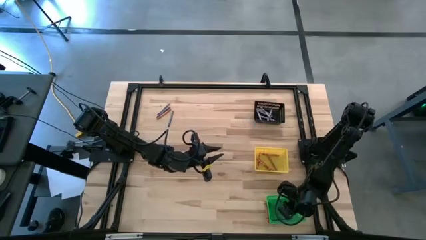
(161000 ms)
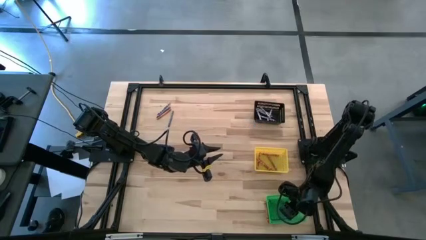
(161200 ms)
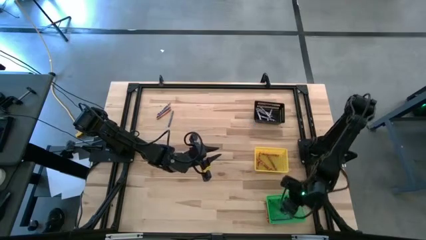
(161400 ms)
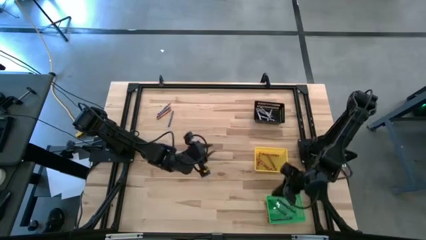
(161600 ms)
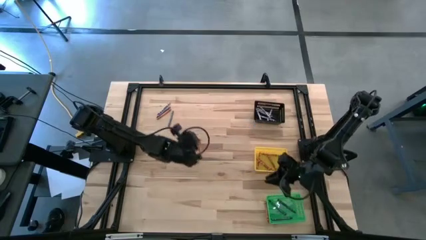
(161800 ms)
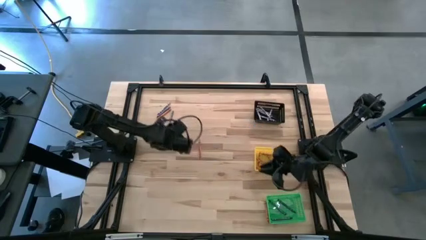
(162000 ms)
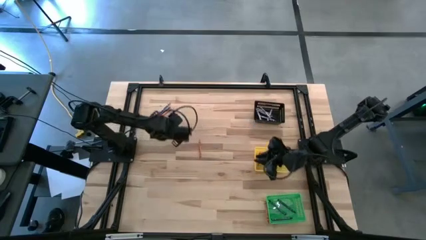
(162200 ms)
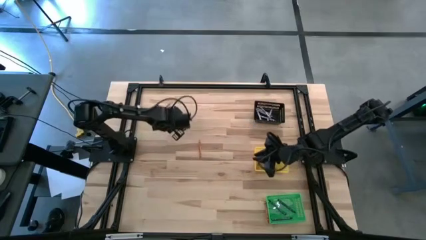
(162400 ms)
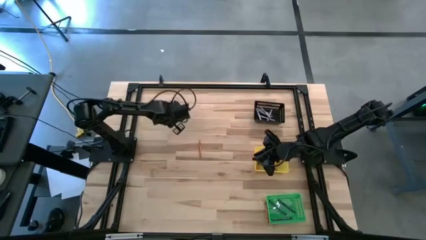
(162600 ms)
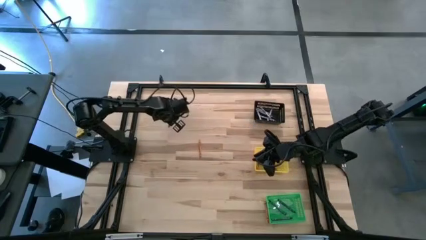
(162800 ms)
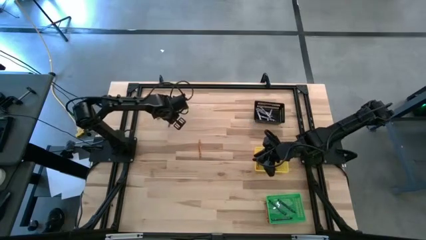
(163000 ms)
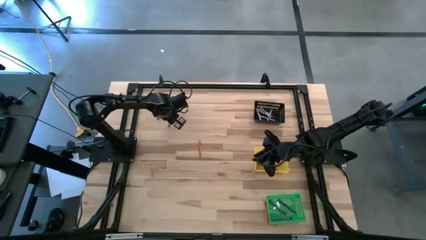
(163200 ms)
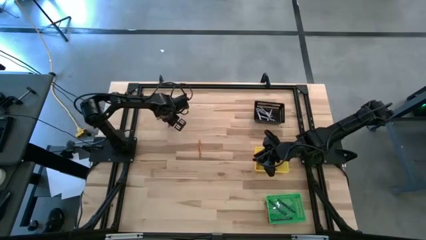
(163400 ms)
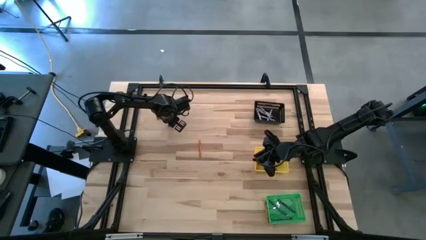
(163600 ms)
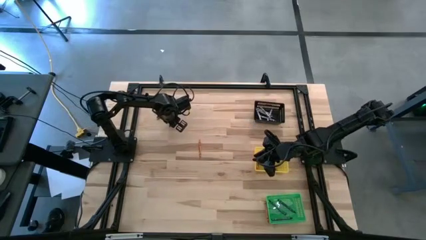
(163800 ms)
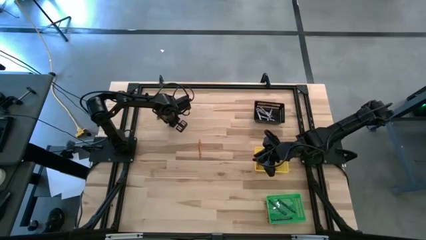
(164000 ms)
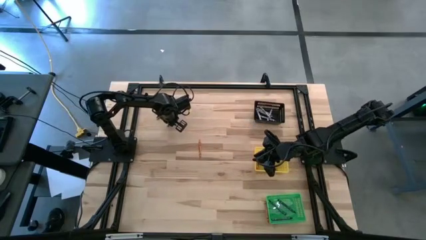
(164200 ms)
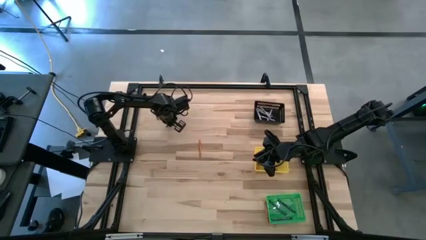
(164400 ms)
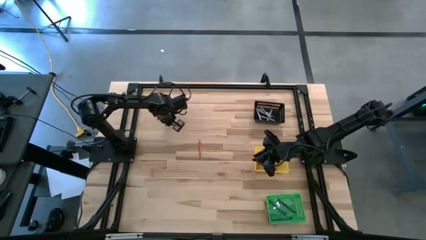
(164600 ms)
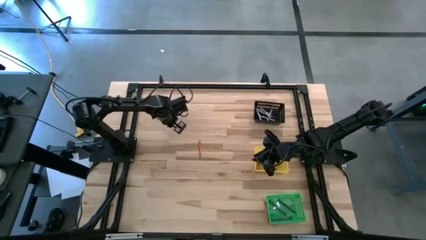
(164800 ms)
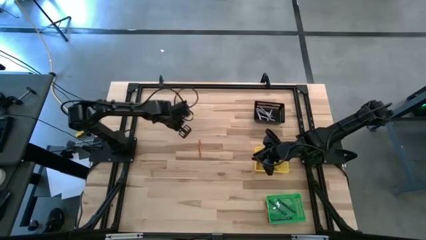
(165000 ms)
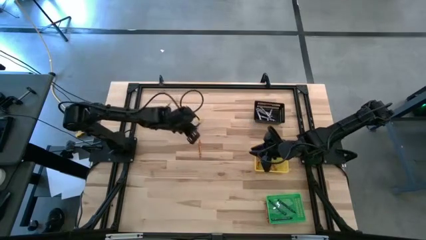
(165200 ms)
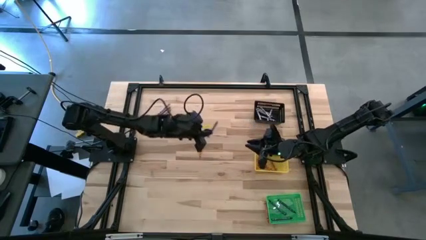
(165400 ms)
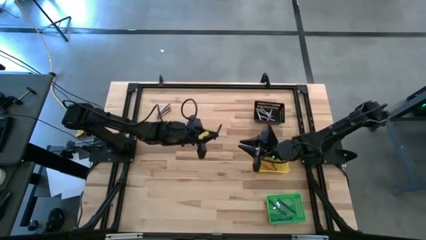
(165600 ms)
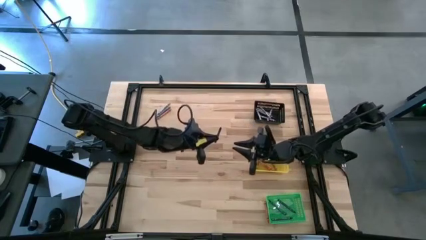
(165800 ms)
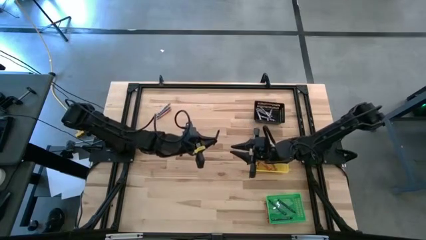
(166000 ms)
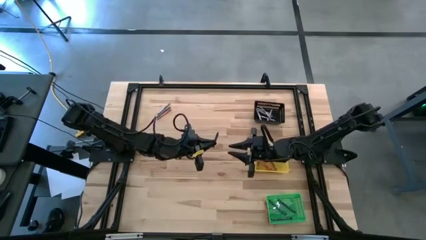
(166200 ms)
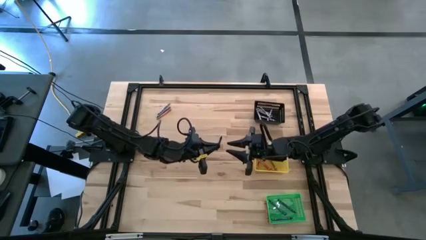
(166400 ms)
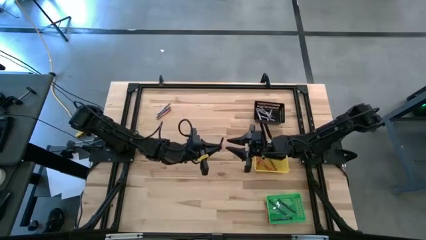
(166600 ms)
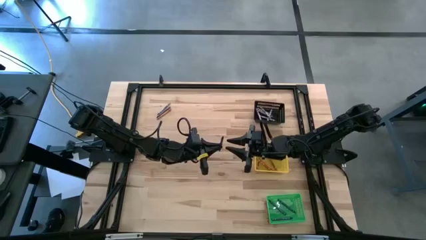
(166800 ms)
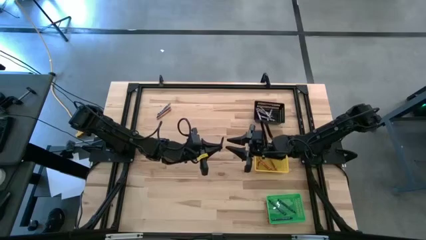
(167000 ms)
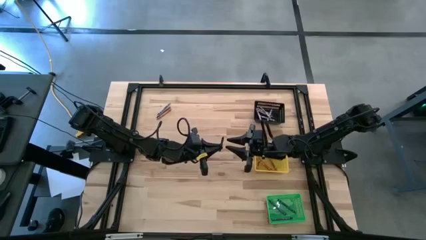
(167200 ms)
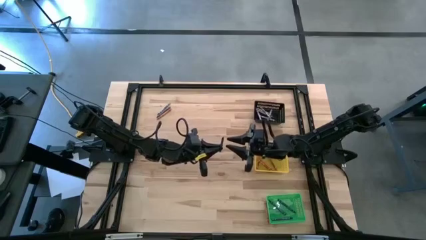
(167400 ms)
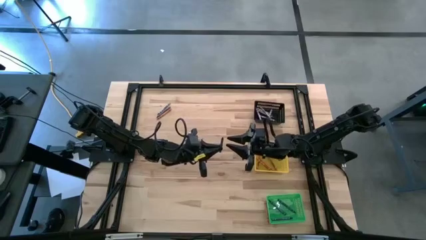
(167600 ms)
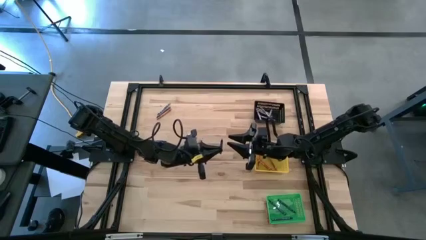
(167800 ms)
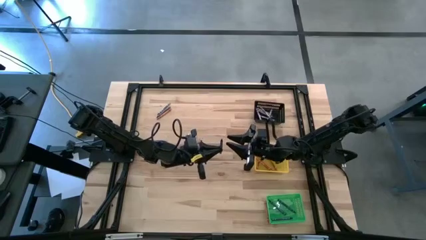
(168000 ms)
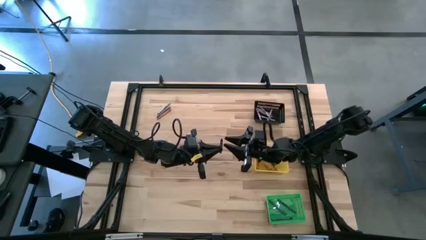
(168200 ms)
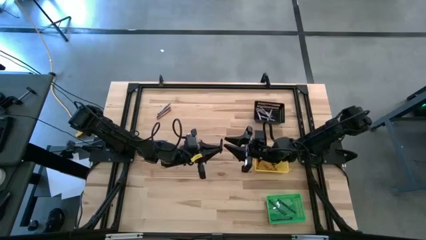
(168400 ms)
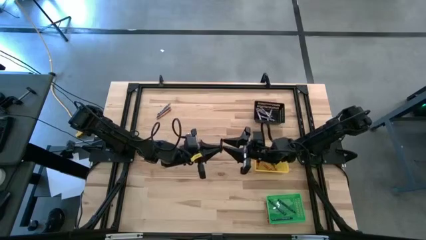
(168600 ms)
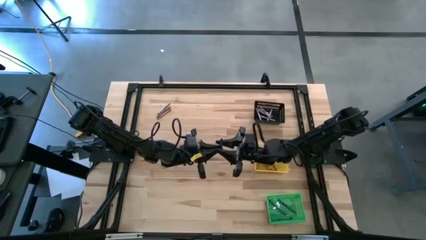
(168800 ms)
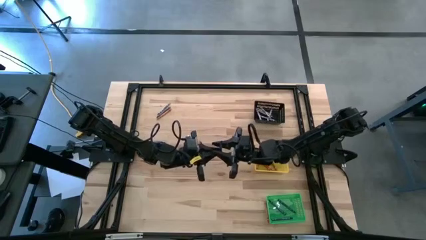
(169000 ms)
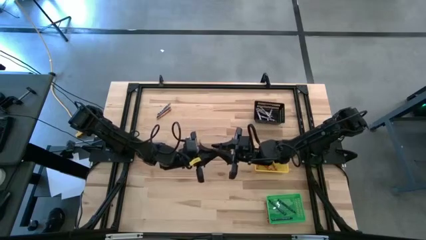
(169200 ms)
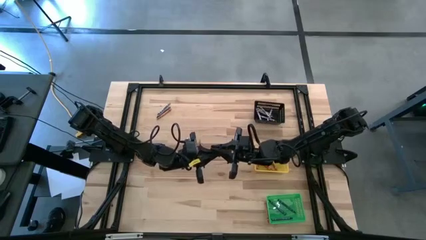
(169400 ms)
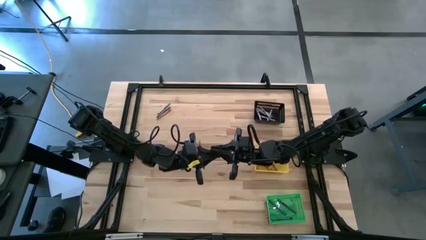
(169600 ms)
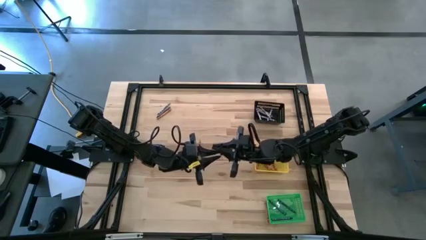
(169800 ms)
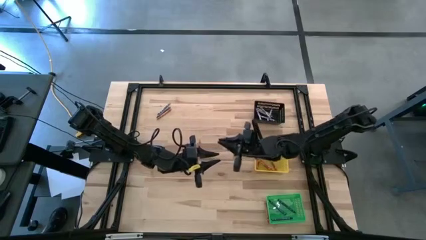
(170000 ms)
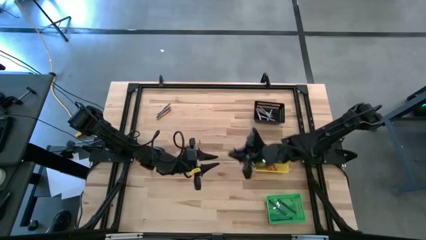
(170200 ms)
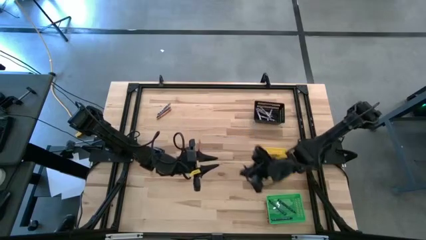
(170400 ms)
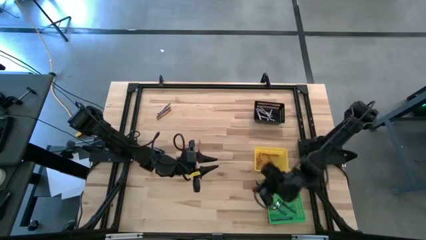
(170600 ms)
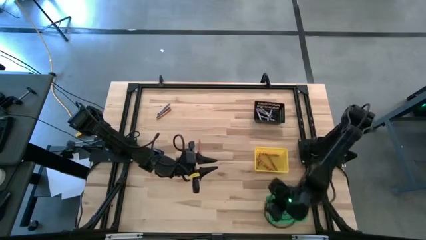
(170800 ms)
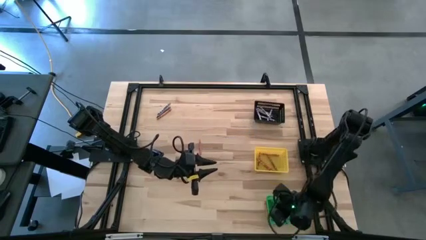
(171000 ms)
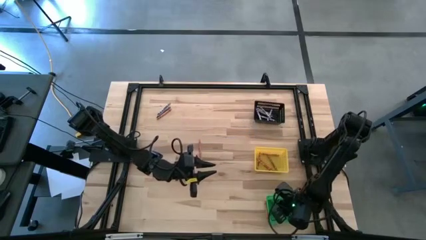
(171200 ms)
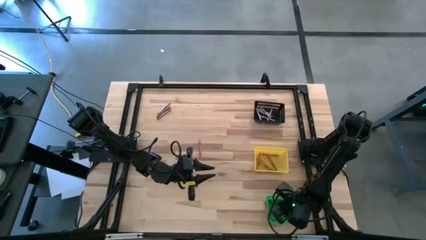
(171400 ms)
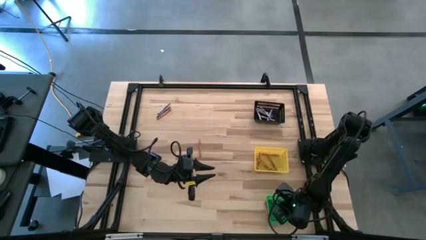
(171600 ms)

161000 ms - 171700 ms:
Task: Sort crayons
Put the blue crayon into the green basket

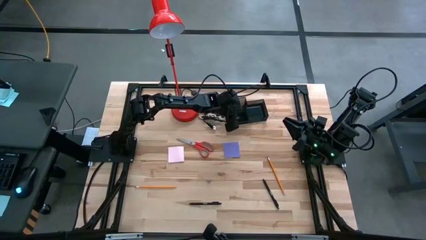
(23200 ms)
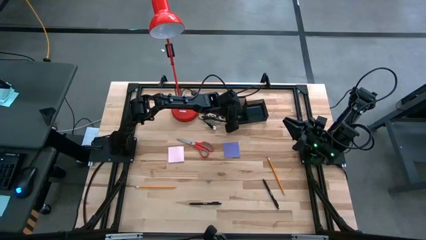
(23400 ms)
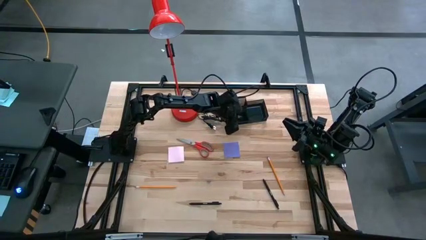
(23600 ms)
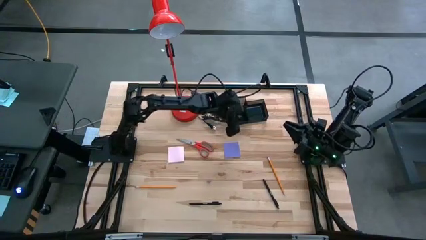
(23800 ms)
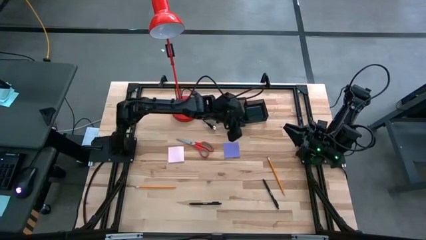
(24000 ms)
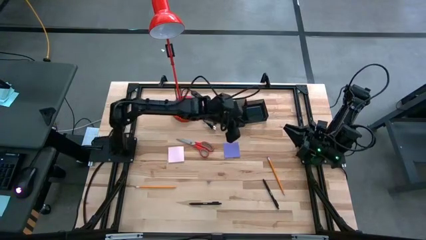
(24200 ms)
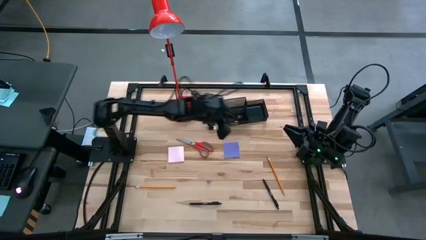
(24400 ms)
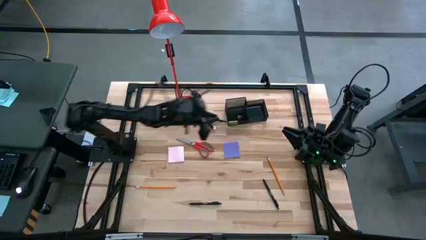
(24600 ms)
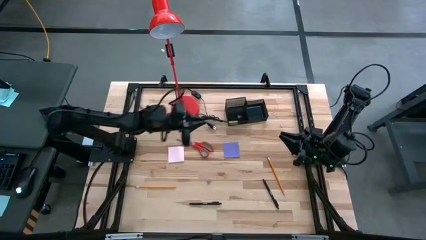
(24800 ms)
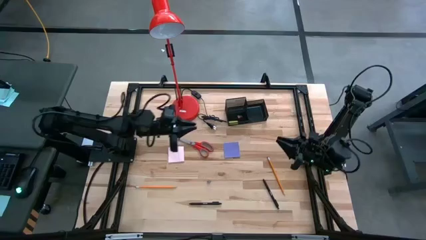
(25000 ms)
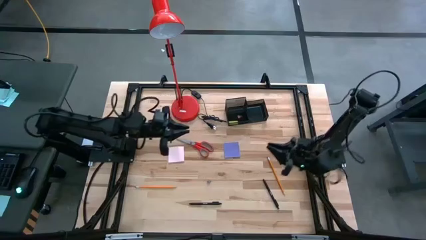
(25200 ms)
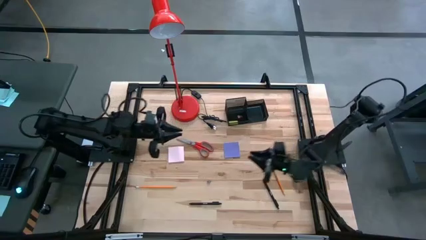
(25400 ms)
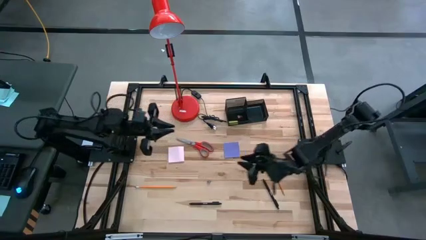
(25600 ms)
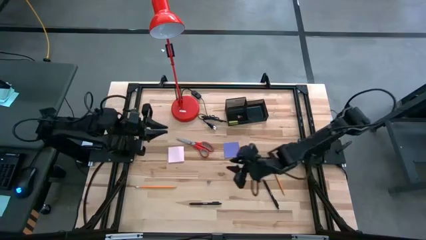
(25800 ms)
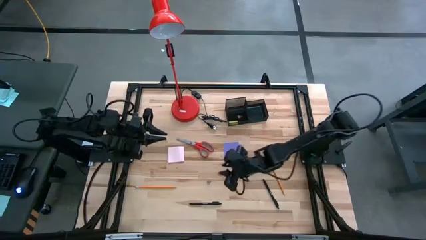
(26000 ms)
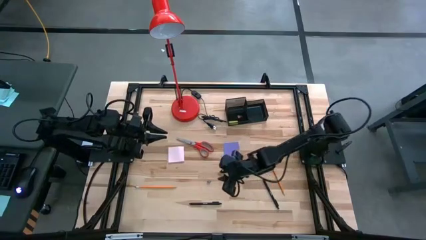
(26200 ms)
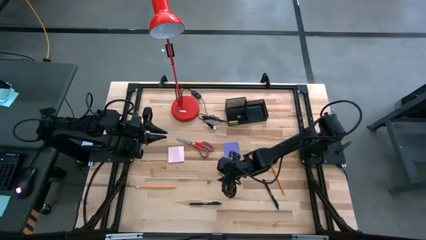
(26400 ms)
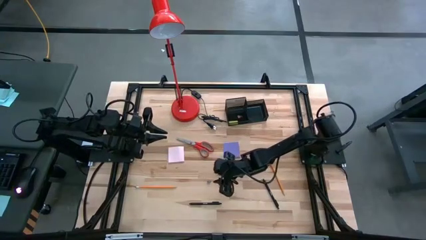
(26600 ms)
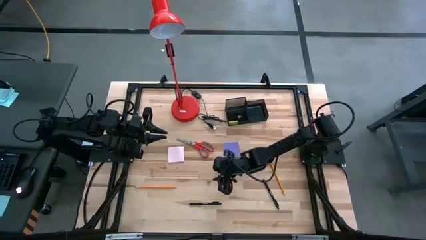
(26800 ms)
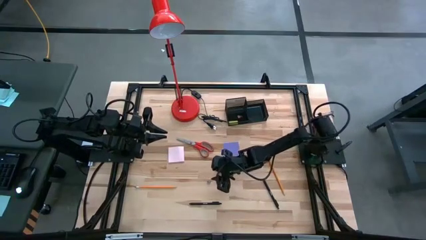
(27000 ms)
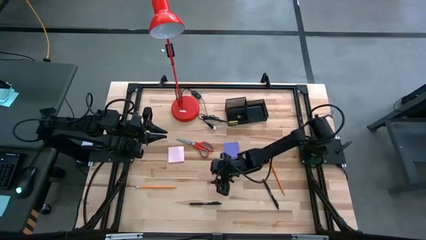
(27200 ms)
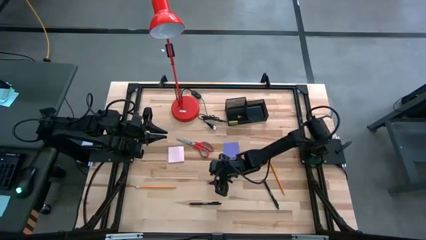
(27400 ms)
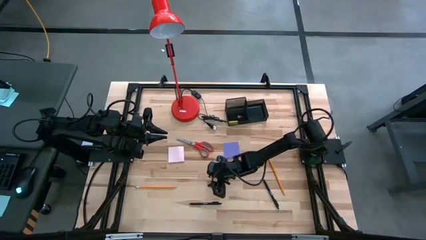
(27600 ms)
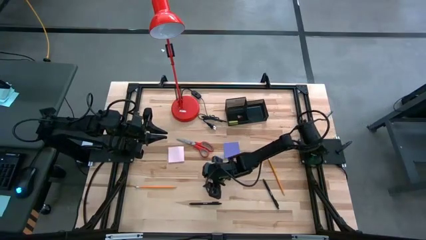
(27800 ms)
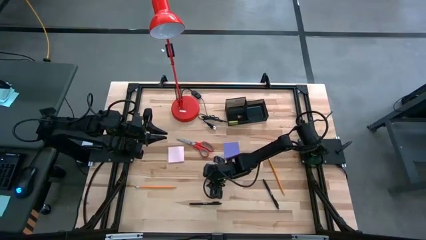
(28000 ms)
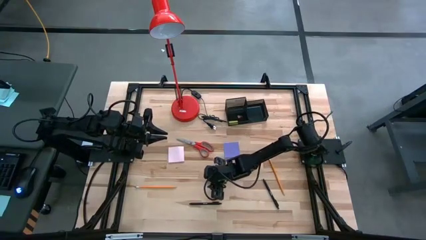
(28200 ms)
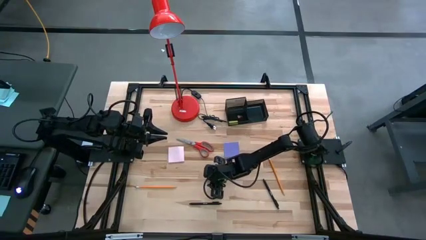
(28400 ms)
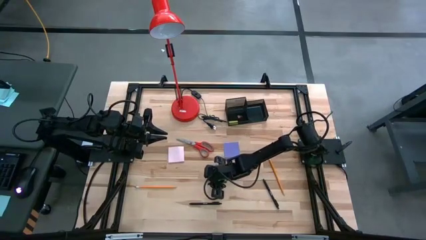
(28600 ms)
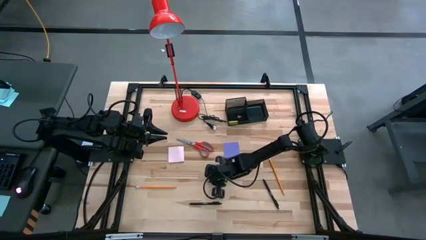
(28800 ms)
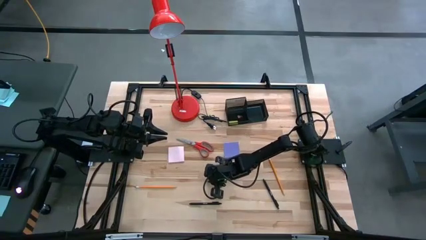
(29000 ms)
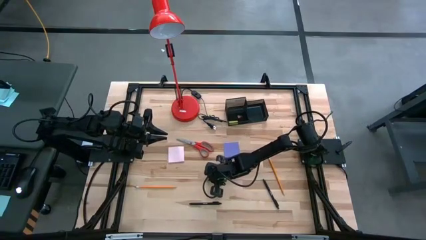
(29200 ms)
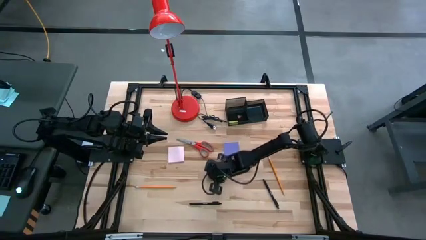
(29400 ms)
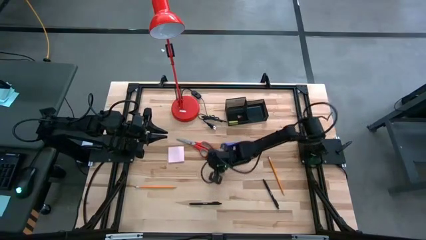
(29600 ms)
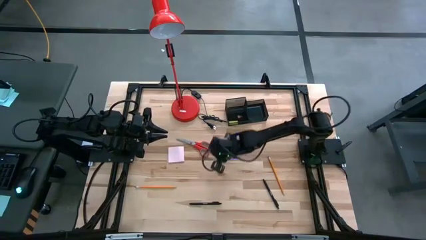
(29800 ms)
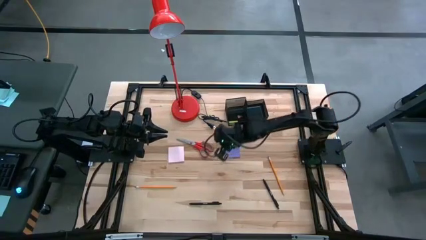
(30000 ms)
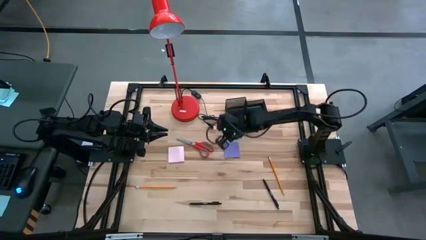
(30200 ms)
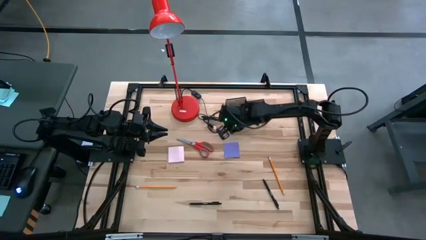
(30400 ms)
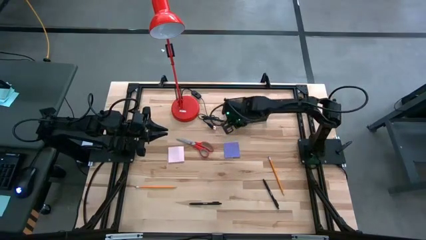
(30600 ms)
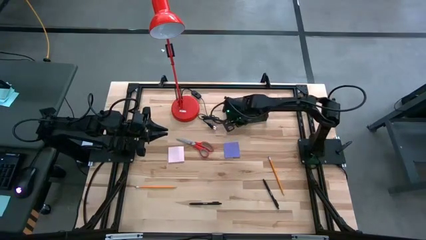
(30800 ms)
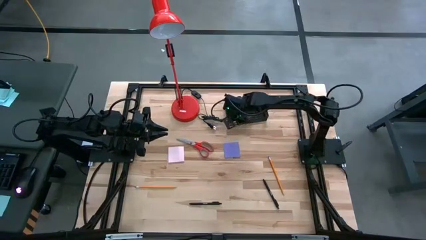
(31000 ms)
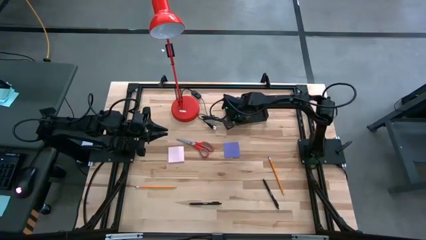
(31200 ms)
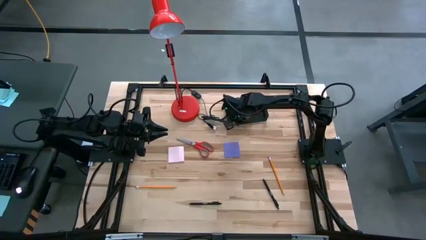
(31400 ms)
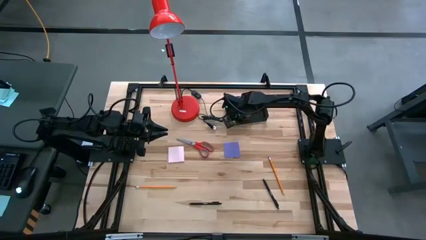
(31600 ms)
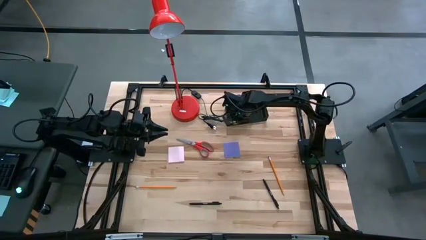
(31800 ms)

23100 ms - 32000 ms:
Task: Pick and place office supplies into organizer
Put the blue binder clip into the black desk organizer
